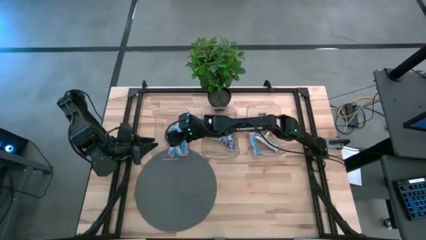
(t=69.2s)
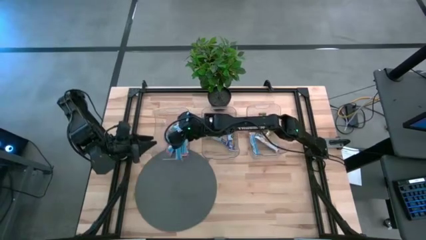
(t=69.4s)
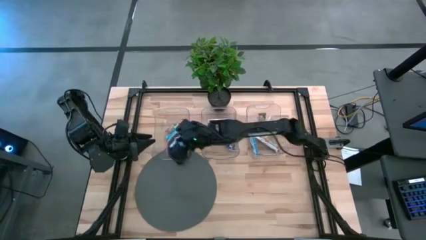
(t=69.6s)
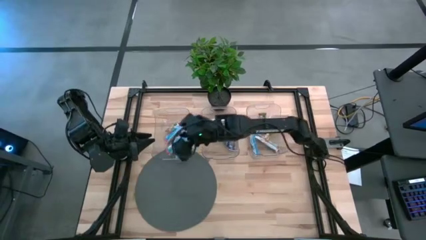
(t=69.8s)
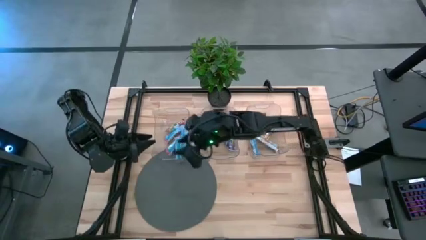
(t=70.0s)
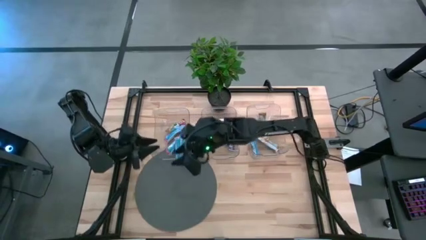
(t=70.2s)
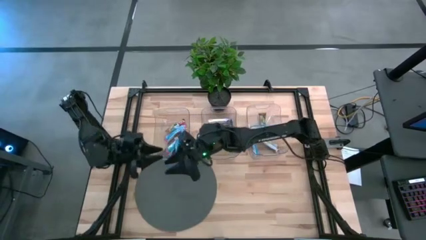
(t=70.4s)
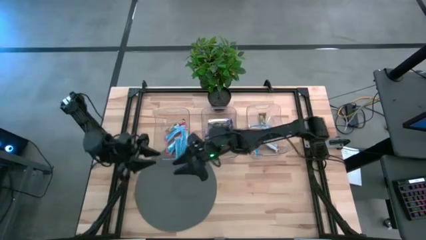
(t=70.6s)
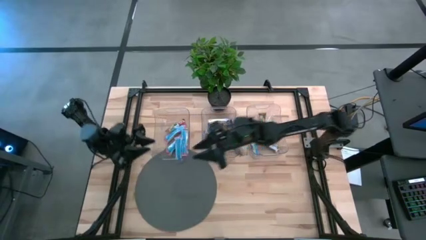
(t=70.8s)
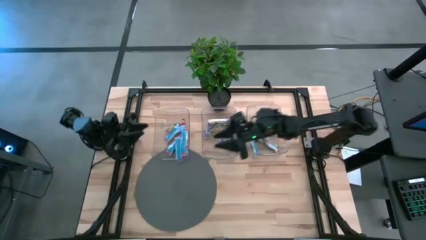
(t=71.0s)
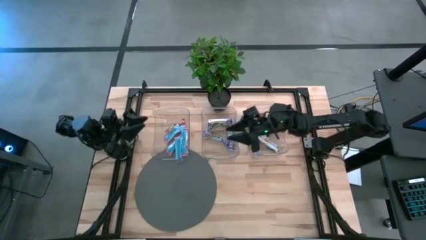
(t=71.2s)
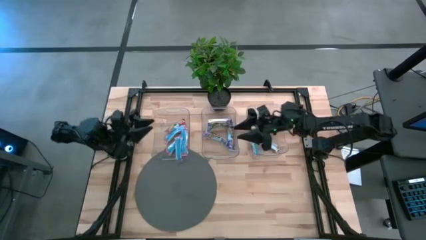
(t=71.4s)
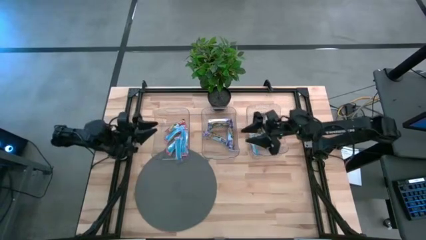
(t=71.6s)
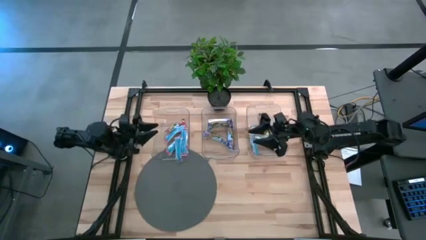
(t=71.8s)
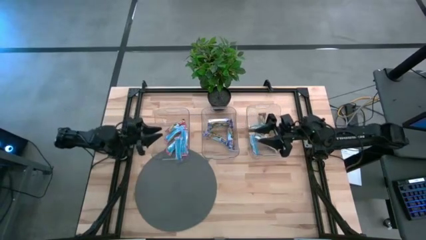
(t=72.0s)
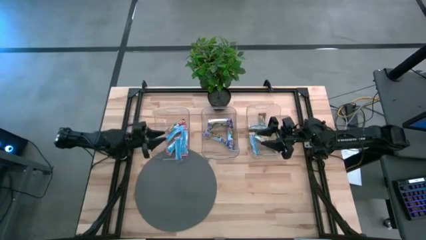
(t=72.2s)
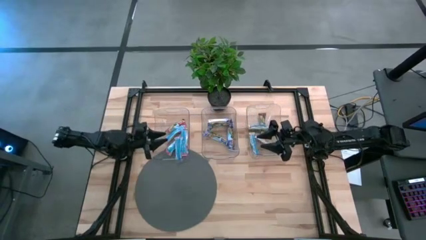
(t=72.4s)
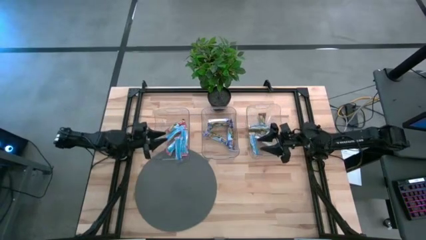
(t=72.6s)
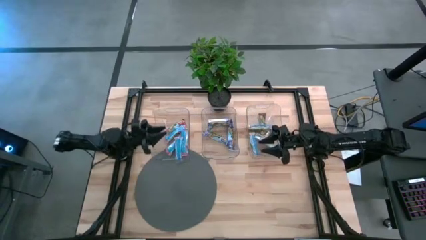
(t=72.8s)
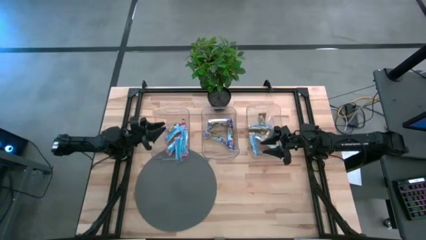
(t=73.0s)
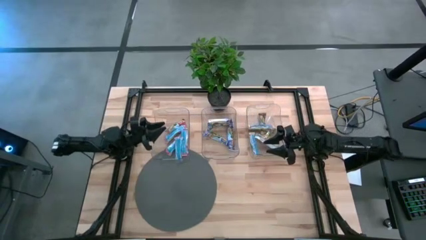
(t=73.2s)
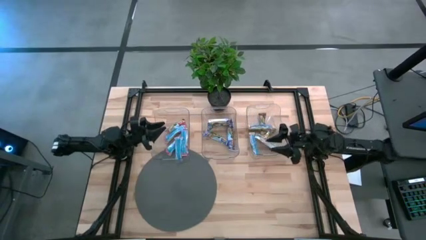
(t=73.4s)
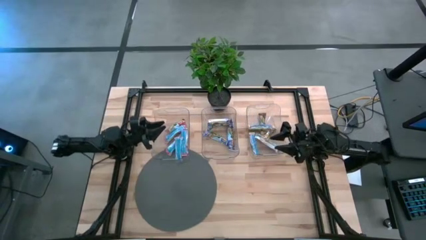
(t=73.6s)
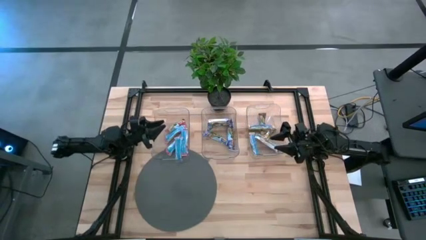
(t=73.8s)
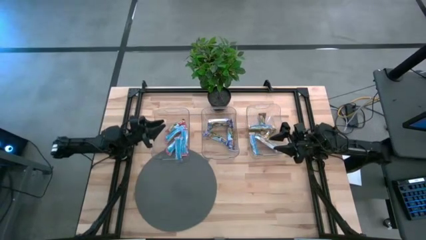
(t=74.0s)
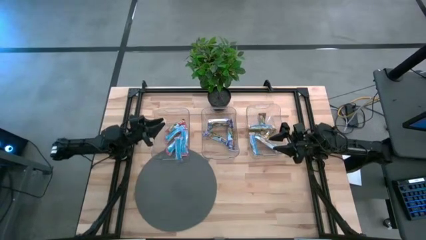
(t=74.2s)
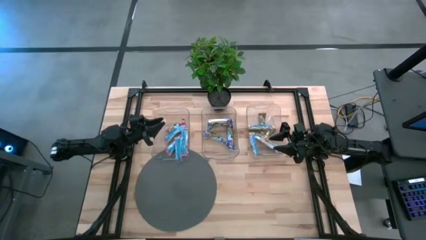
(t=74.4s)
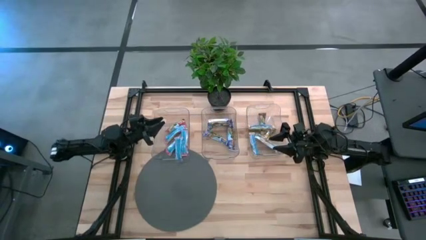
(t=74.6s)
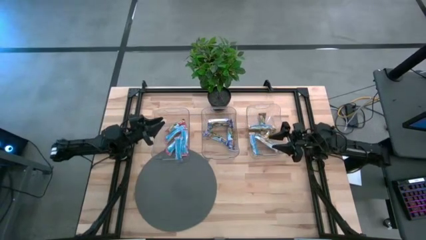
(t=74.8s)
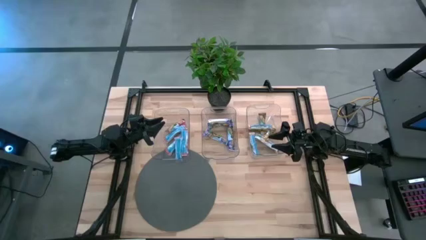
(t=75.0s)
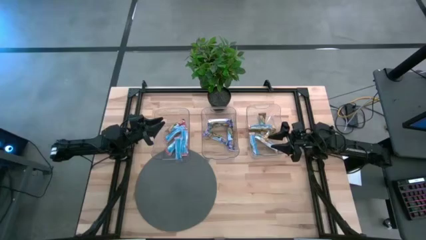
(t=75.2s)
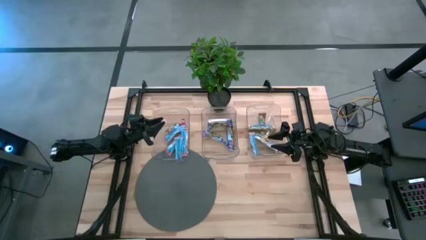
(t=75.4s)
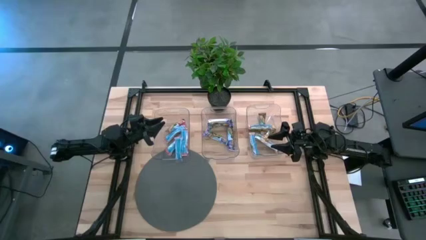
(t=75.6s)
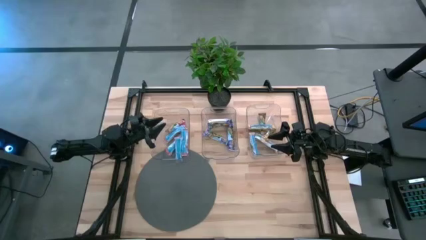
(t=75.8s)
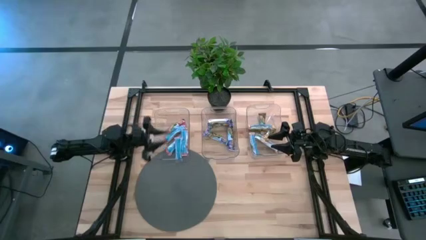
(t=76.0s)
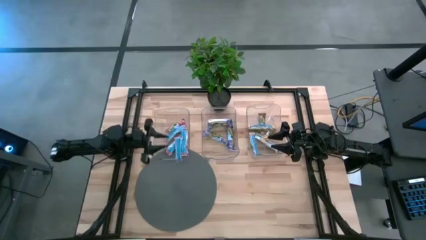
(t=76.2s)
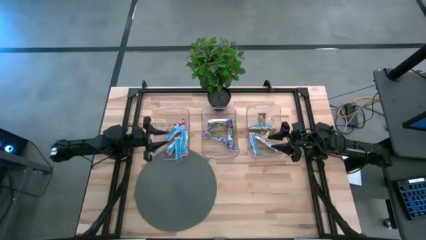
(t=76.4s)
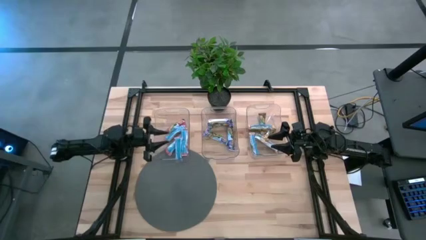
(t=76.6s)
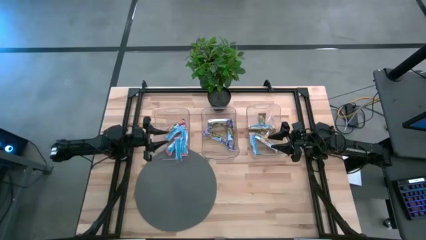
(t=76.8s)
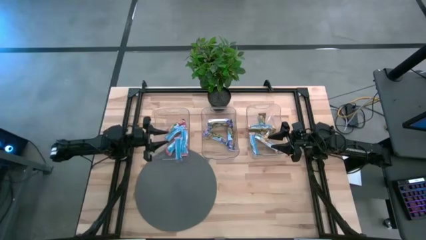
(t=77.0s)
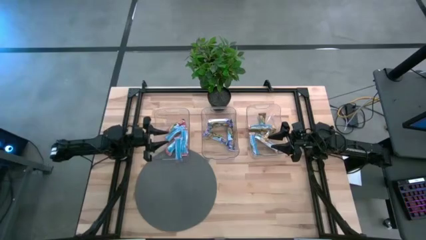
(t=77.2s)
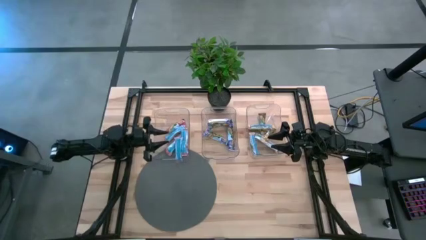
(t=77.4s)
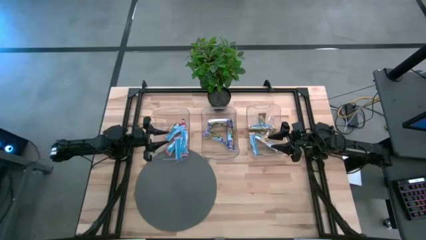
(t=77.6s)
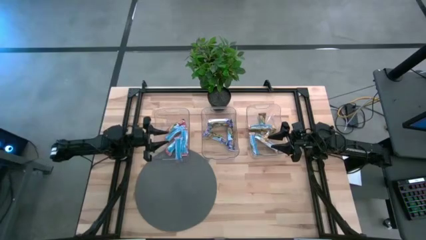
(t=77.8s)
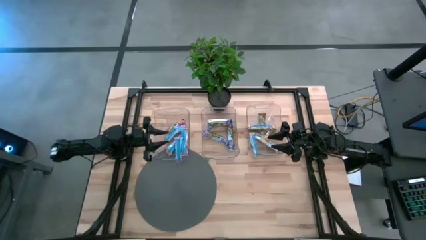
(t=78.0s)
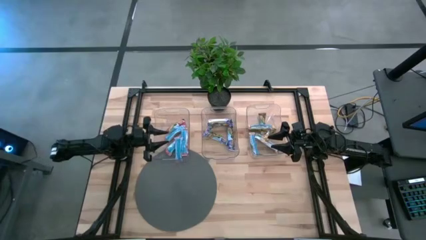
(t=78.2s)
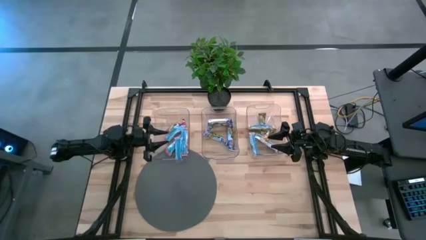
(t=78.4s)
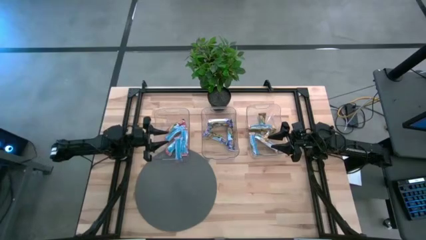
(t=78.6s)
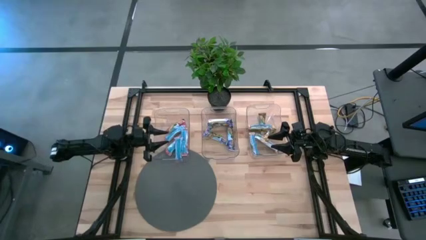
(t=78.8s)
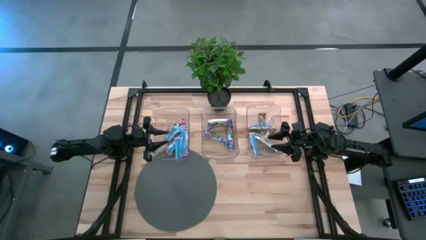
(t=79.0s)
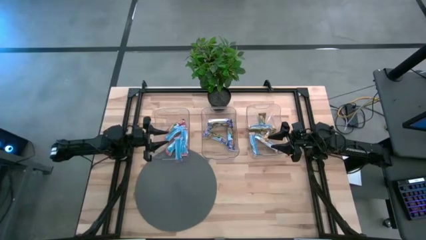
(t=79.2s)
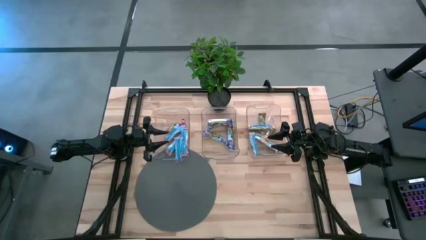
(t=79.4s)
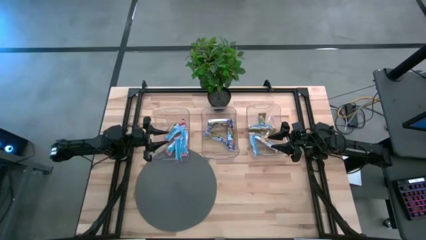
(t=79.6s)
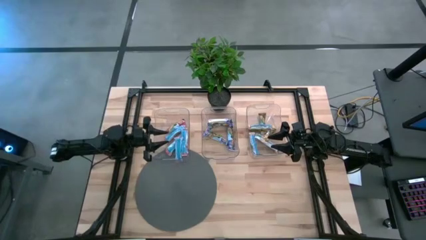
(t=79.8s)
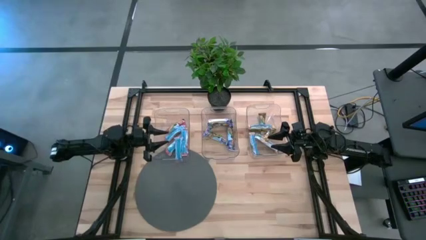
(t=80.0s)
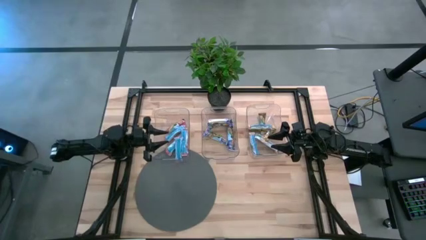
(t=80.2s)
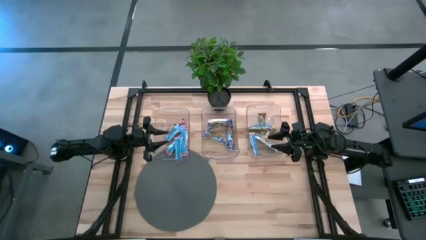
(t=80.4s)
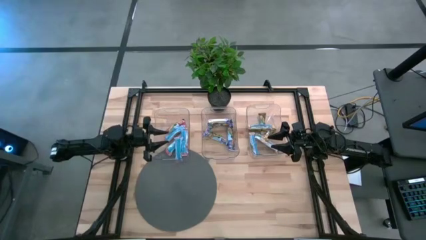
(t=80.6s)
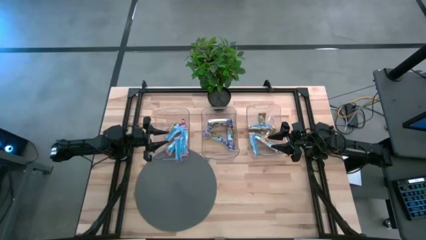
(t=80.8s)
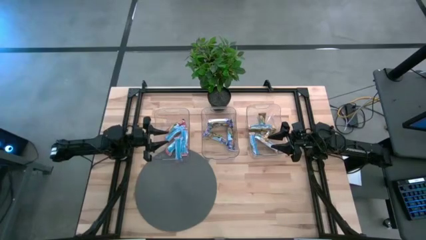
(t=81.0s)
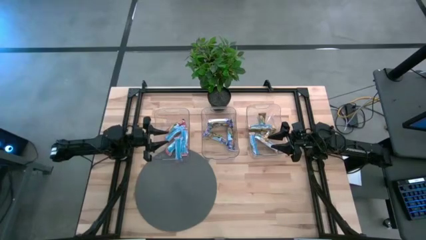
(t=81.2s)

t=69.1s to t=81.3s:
Task: Pick and place Granola Bars by type
Return to Home Position

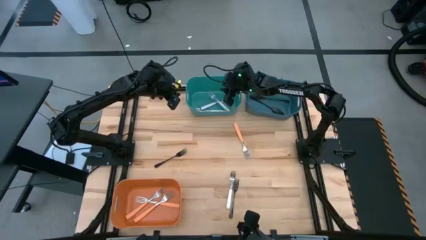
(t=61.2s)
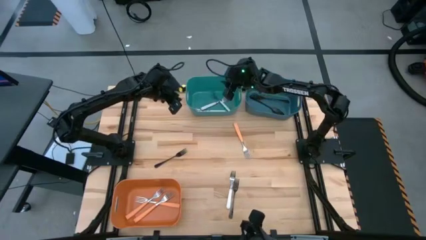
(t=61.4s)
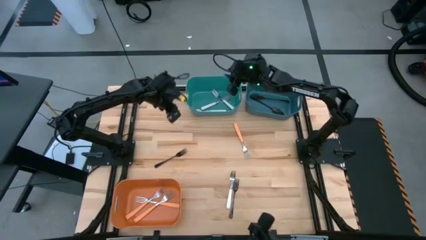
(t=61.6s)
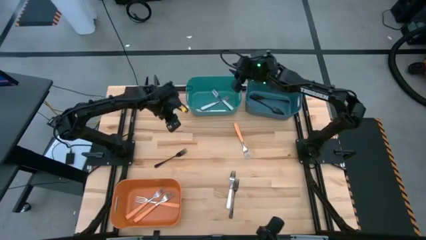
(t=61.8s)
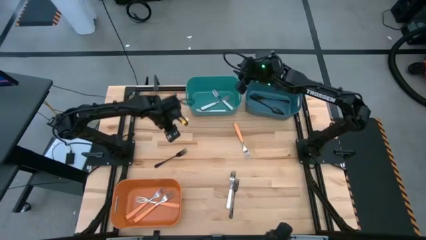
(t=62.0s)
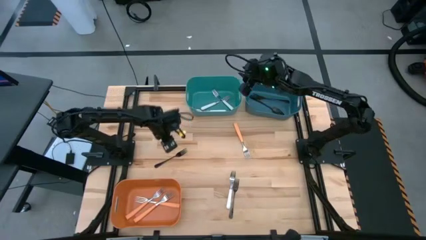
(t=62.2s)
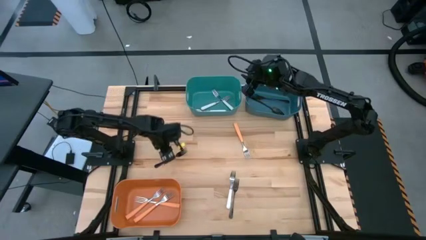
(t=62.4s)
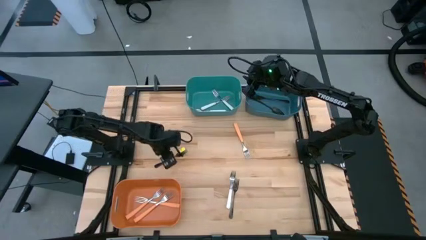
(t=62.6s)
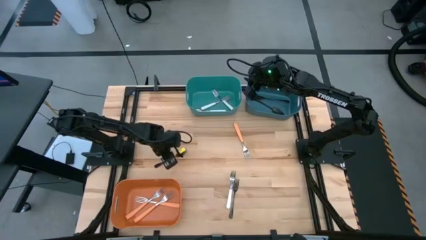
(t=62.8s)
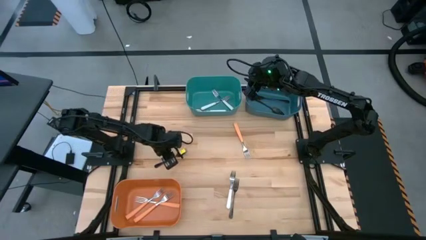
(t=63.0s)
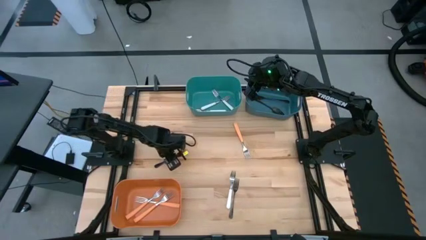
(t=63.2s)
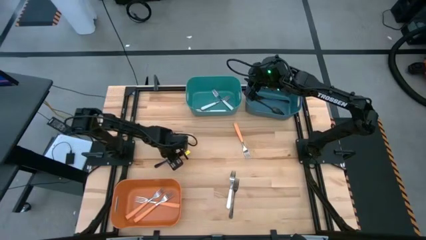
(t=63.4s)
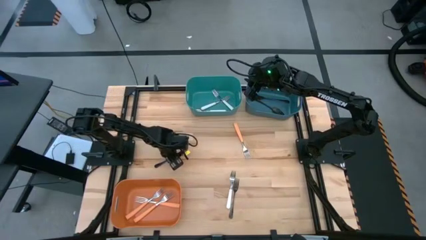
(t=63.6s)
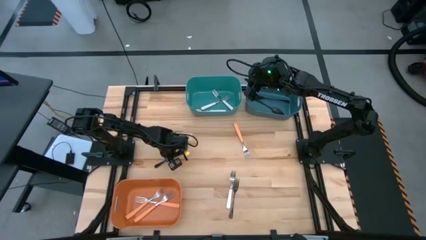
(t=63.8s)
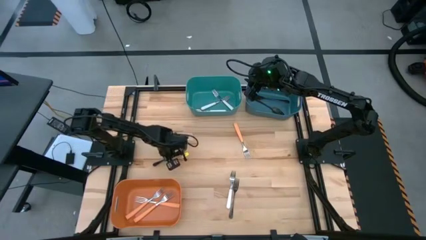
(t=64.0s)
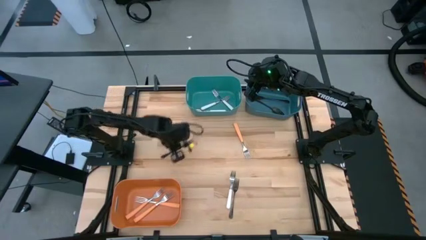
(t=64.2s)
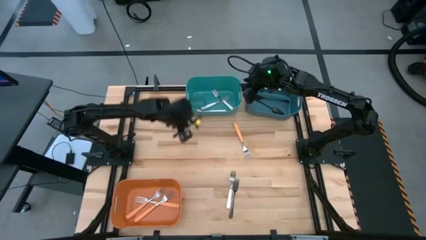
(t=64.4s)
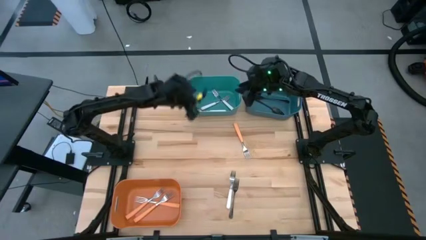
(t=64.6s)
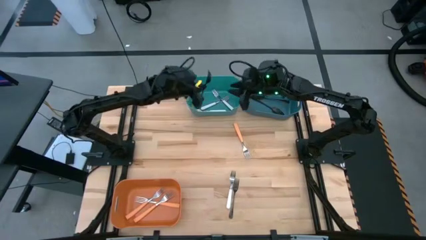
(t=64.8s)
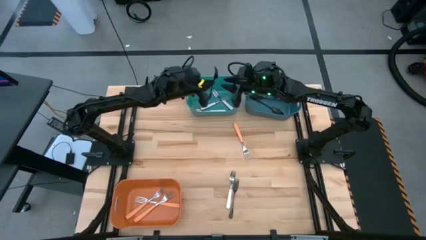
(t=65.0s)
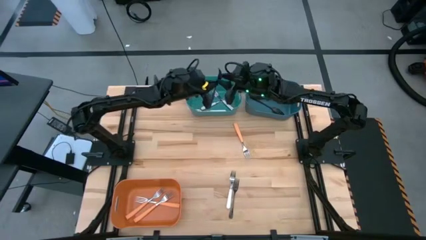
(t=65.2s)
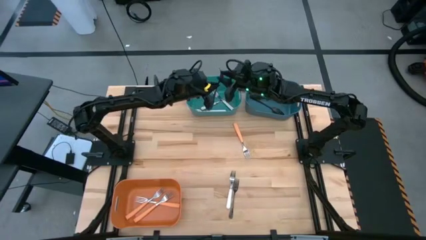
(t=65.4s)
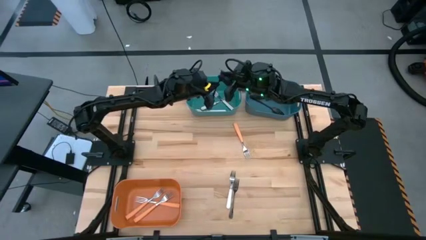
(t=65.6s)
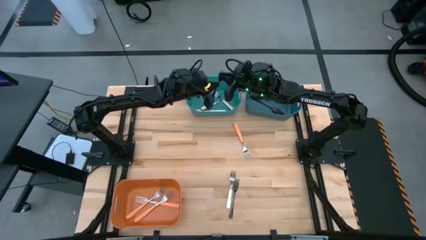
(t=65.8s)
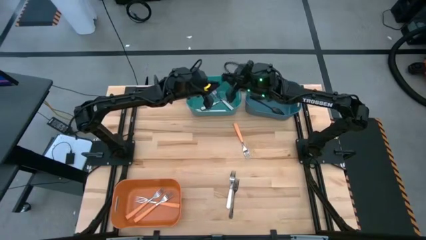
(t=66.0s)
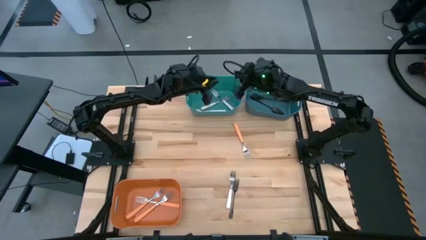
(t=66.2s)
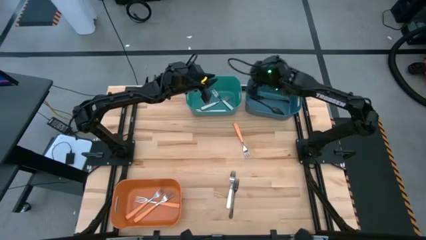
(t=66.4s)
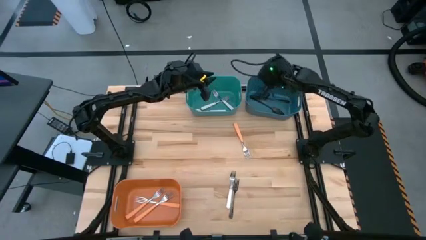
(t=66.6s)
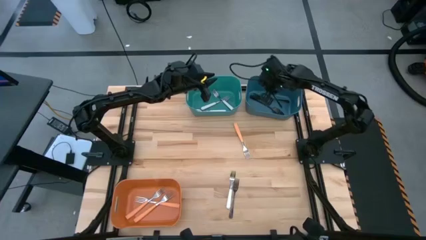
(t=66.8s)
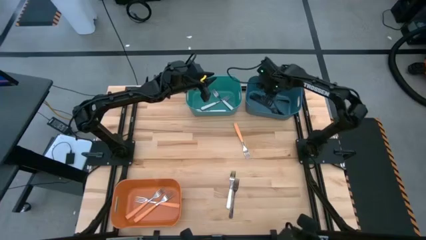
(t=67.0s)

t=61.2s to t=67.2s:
Task: Sort silverware by color (type)
Put the left black fork into the blue bin
